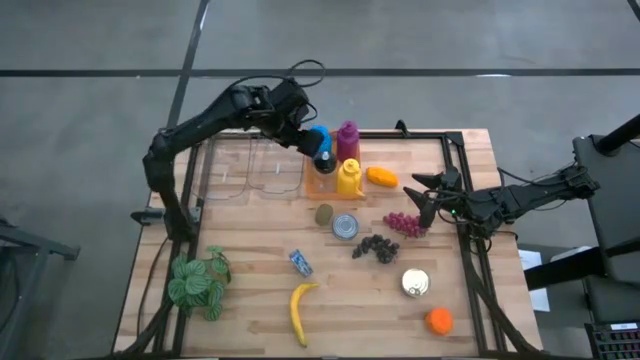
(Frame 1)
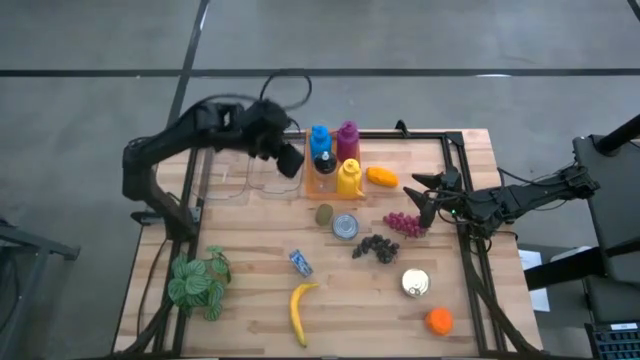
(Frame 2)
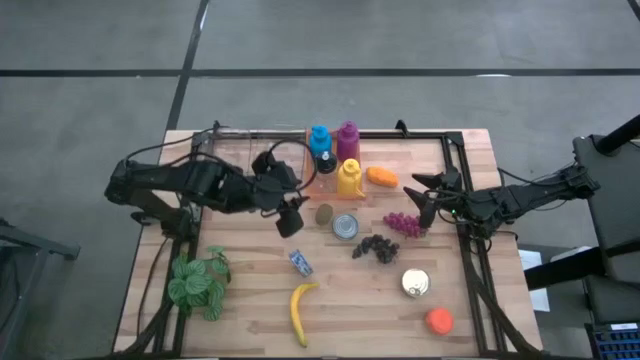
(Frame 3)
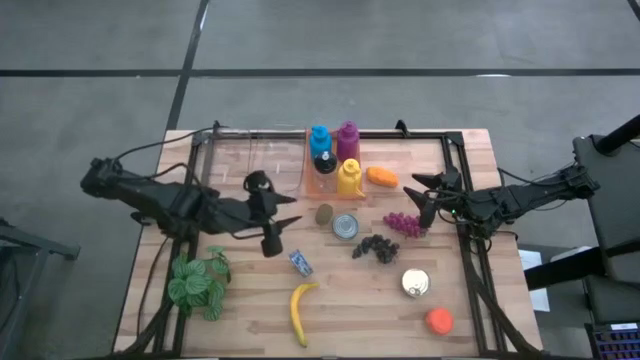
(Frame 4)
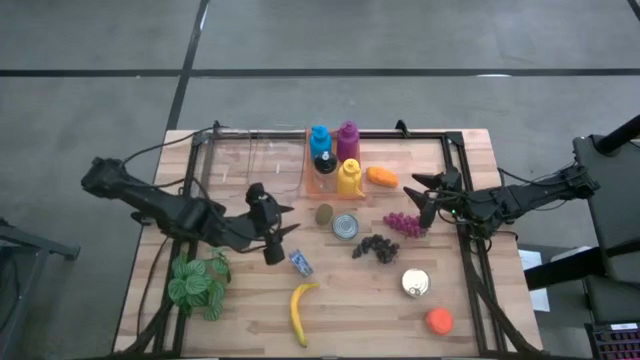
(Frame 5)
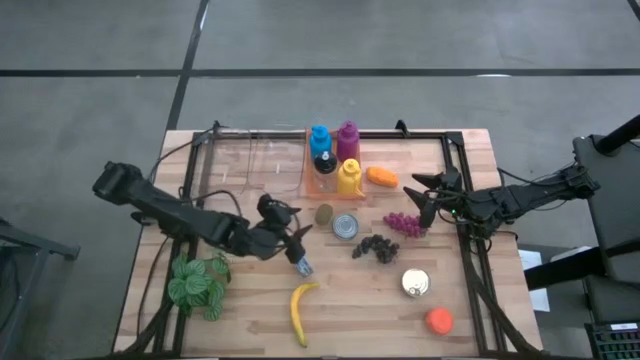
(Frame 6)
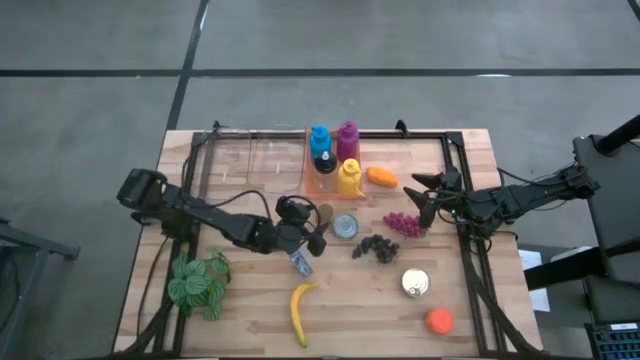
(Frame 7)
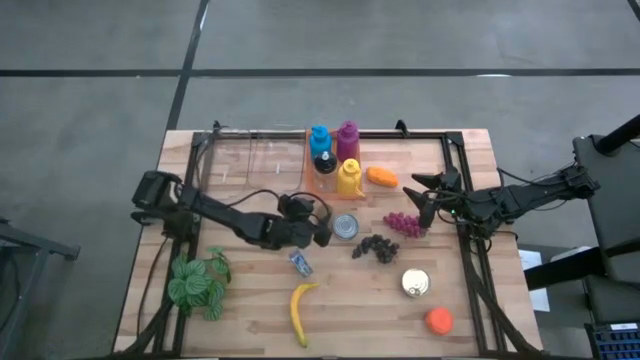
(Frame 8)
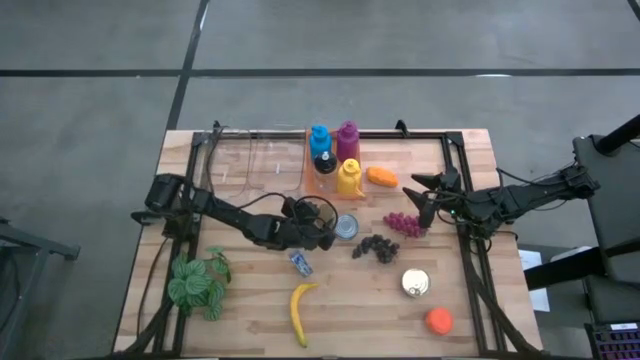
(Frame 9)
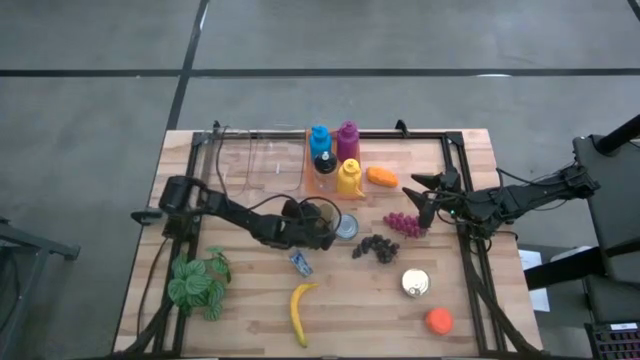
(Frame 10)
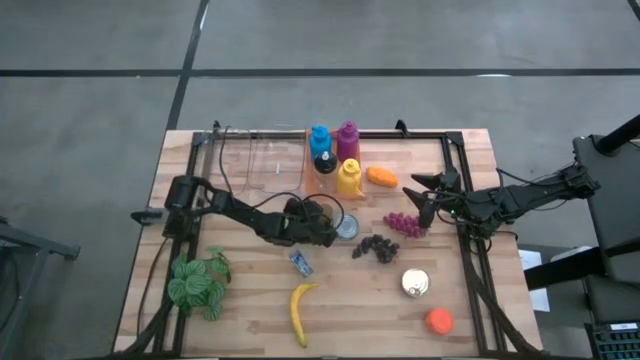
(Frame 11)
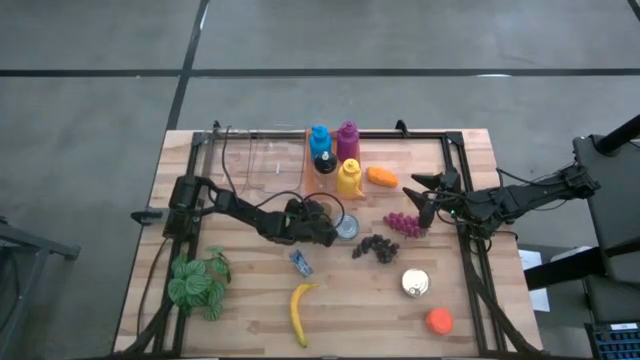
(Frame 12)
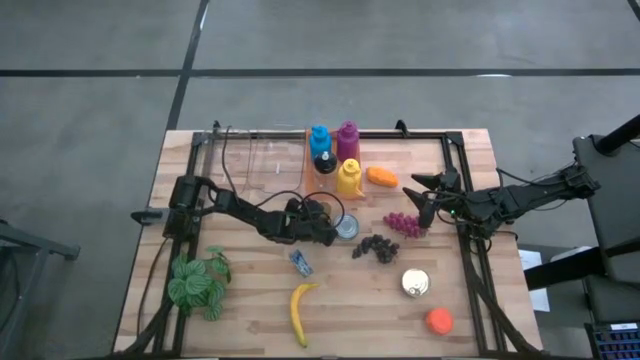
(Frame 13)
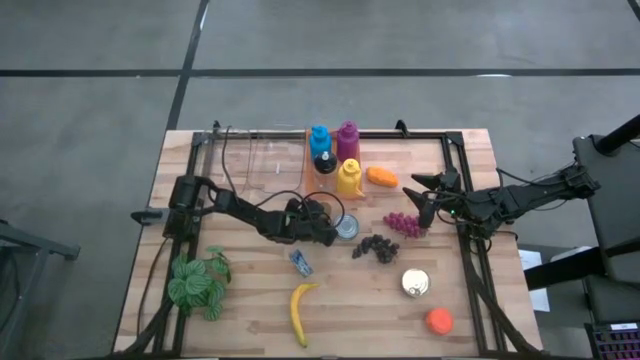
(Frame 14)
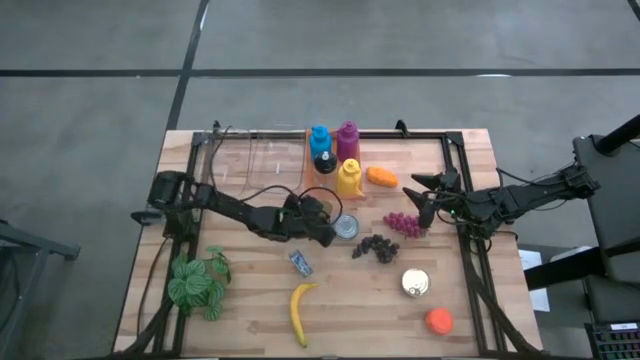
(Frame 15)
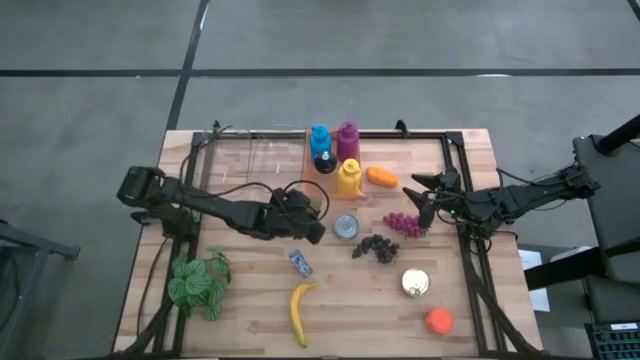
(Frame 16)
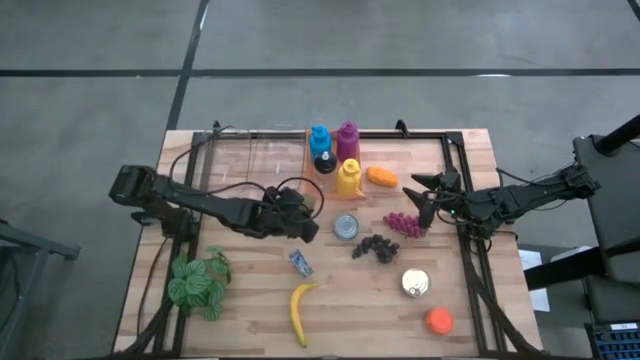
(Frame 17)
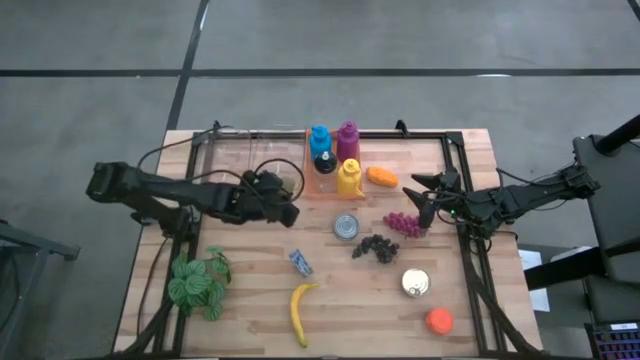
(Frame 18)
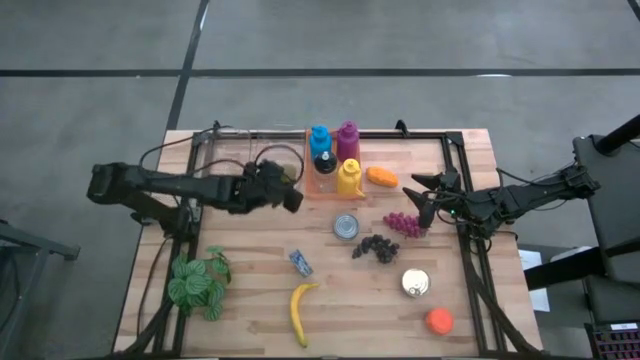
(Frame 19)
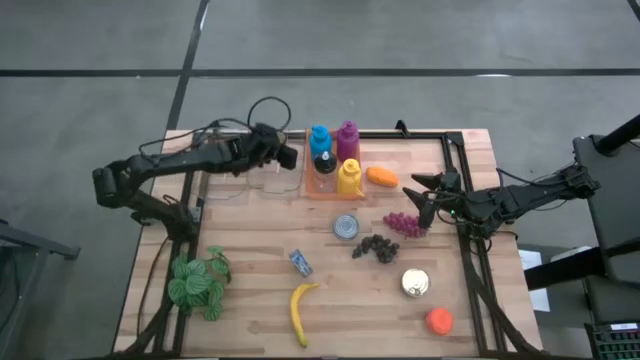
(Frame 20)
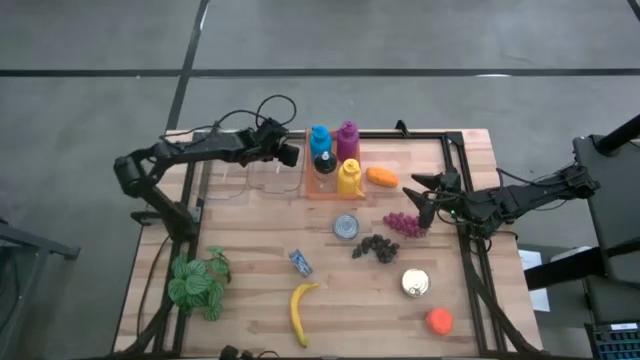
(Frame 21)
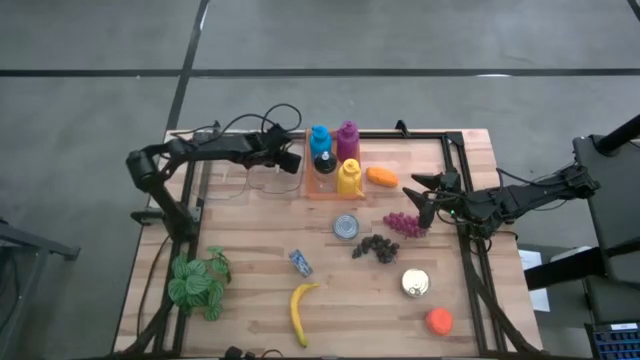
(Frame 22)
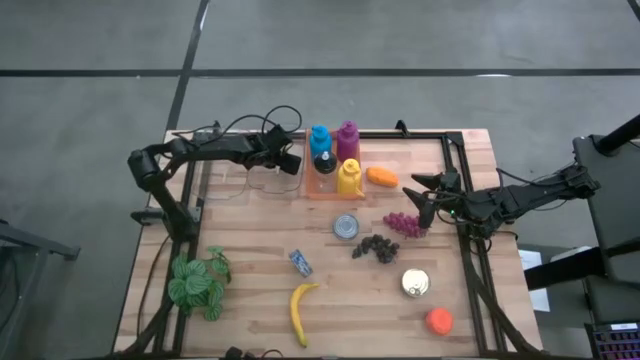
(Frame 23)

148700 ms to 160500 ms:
Task: Pick & Place Food Item
Put the brown kiwi into the right transparent bin

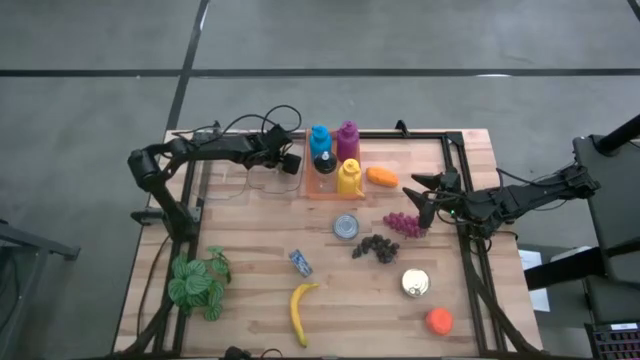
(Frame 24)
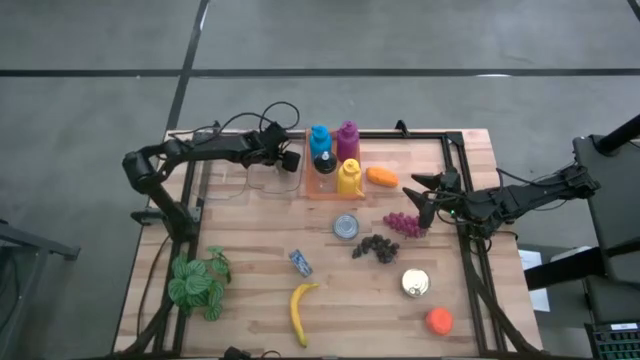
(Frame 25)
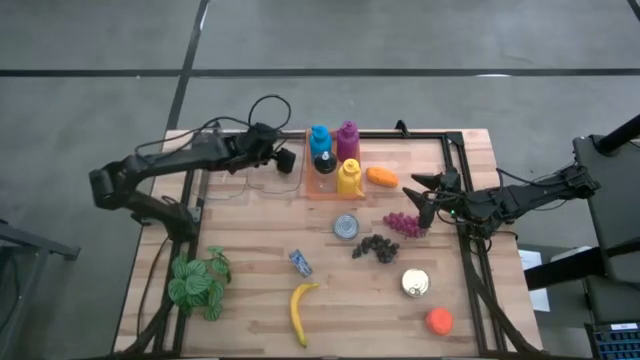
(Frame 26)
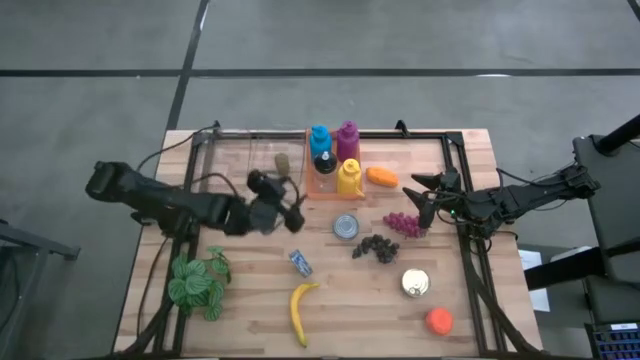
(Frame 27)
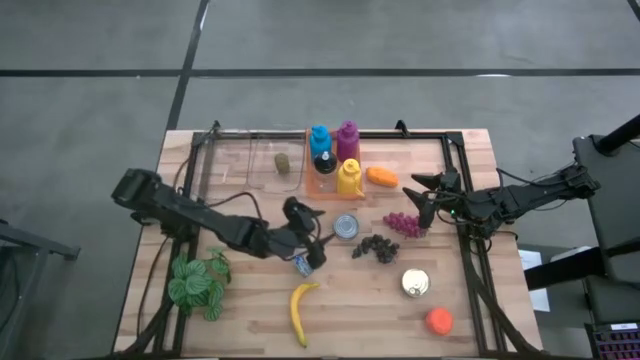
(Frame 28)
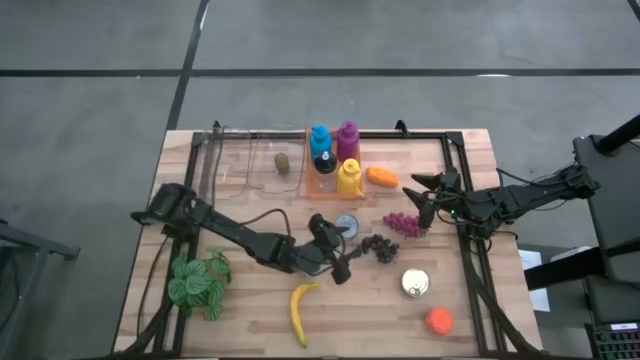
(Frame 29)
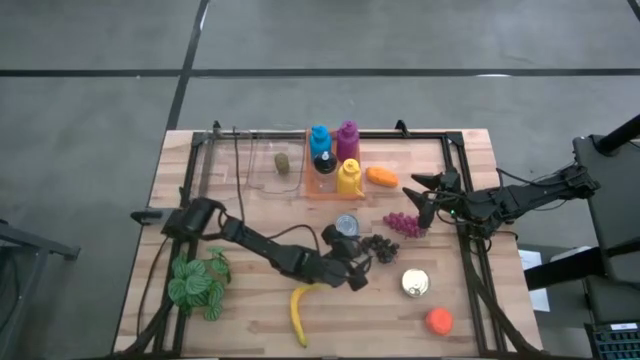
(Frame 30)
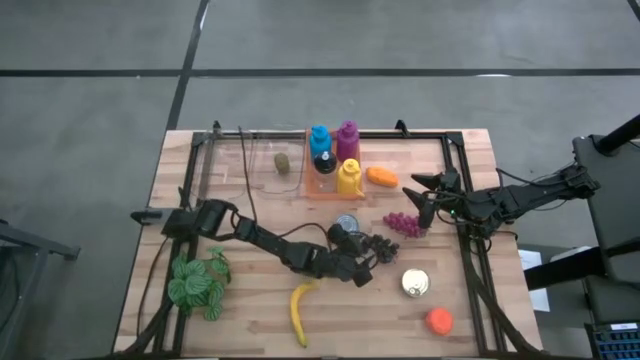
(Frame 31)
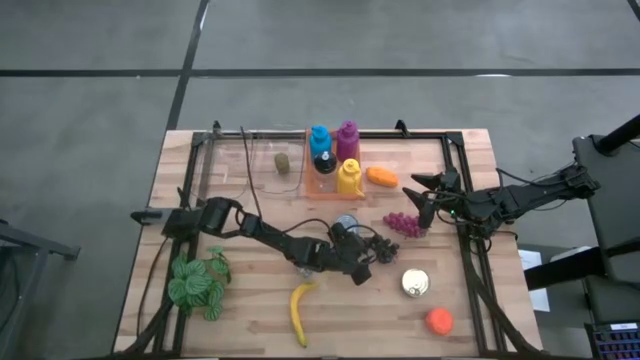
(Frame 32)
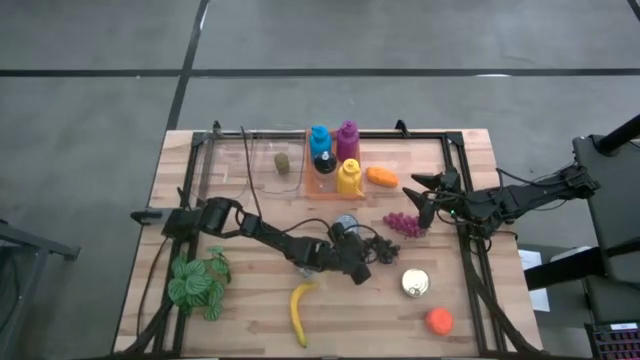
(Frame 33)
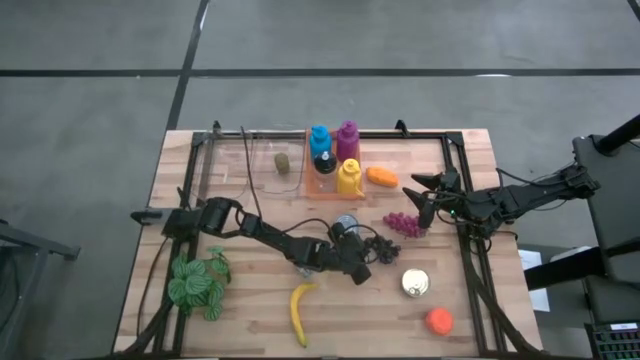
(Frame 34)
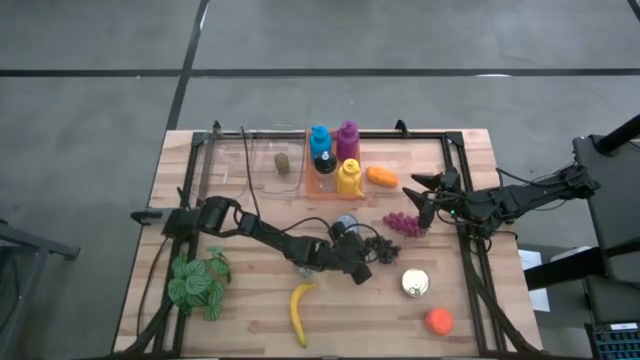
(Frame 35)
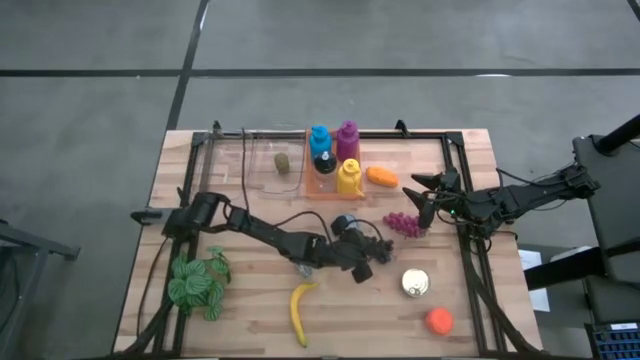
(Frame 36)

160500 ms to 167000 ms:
Put the black grapes into the right transparent bin
